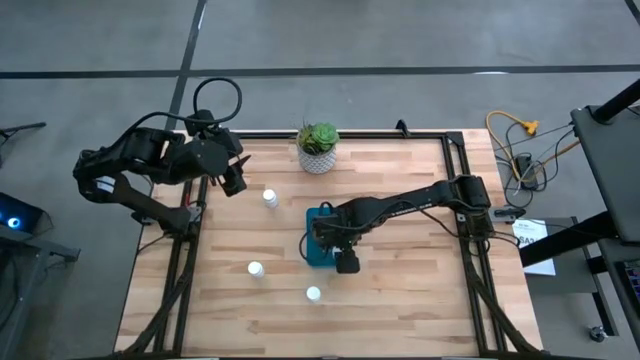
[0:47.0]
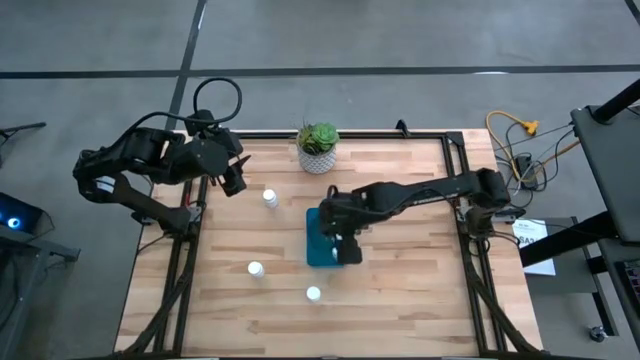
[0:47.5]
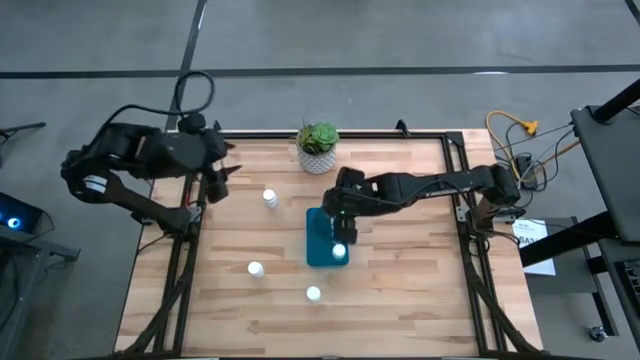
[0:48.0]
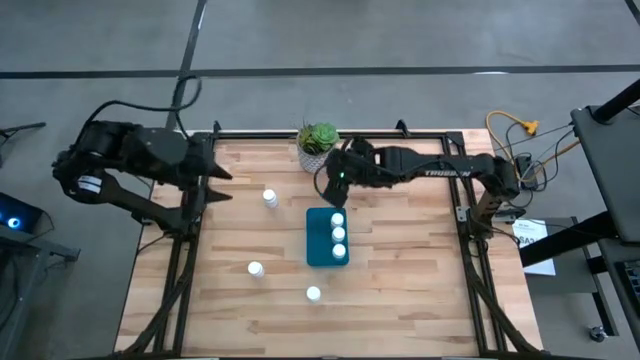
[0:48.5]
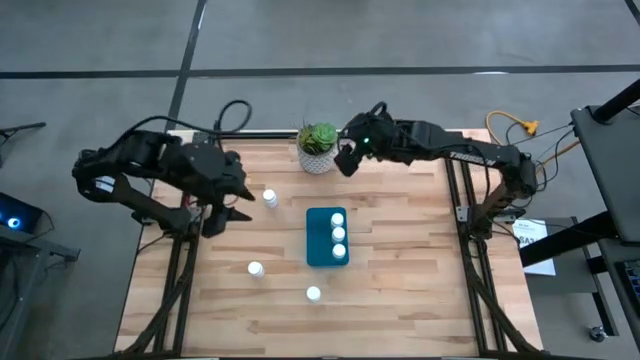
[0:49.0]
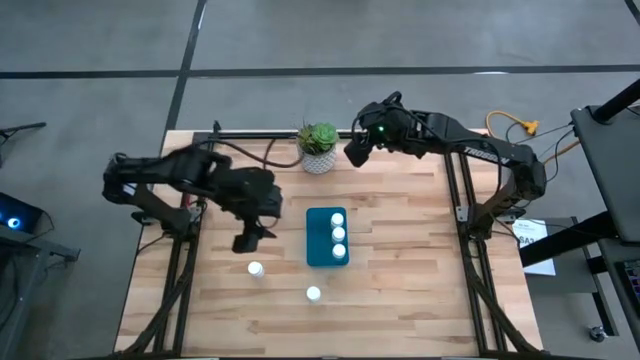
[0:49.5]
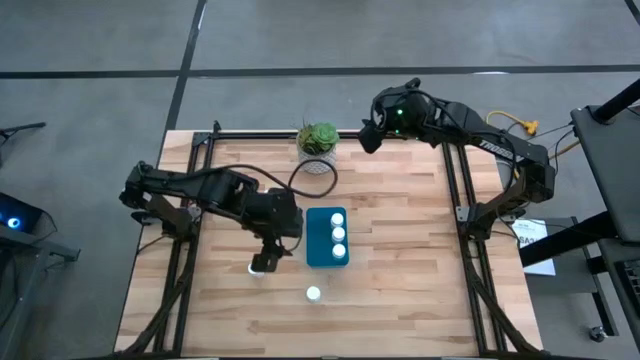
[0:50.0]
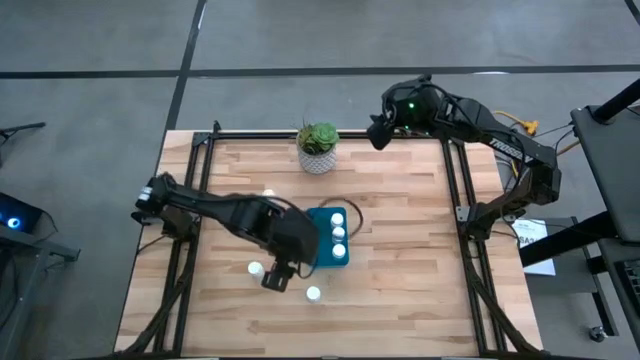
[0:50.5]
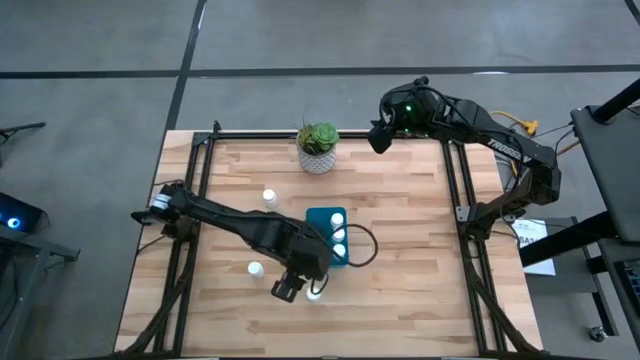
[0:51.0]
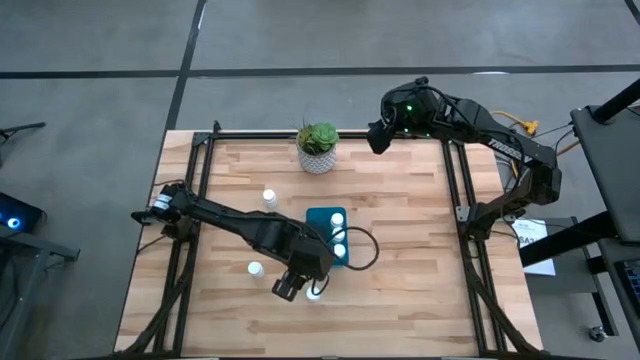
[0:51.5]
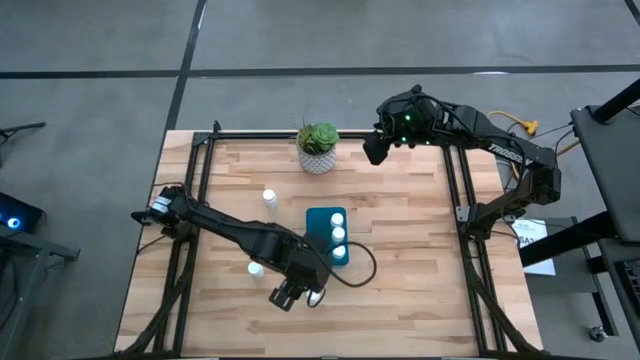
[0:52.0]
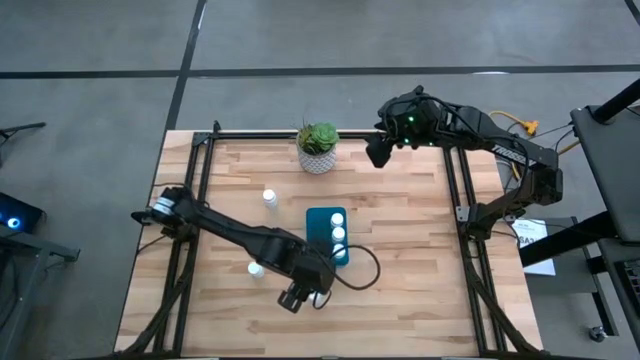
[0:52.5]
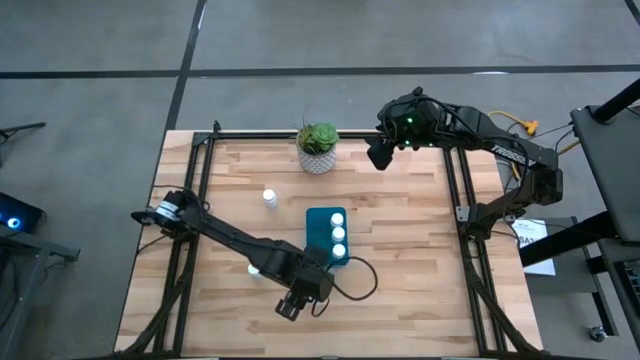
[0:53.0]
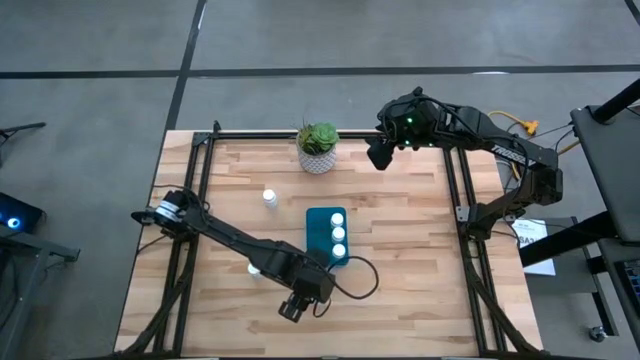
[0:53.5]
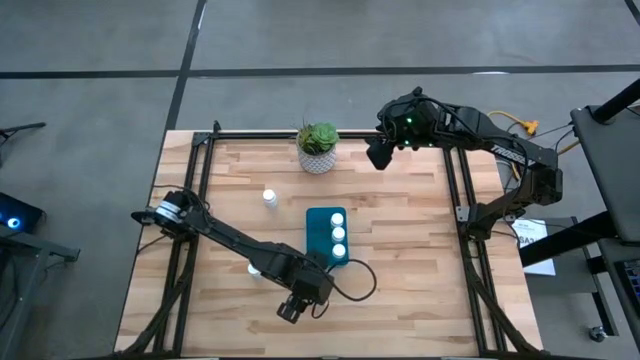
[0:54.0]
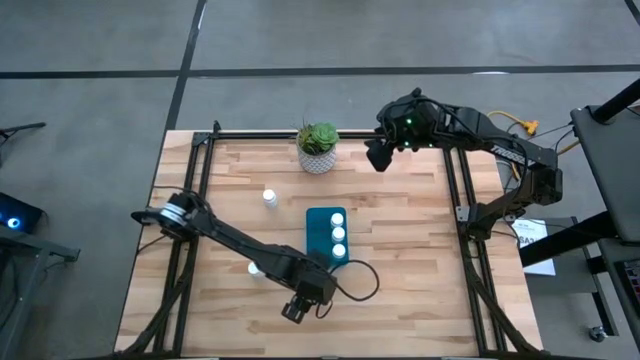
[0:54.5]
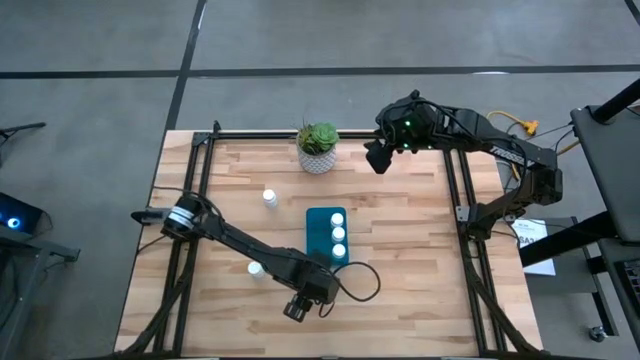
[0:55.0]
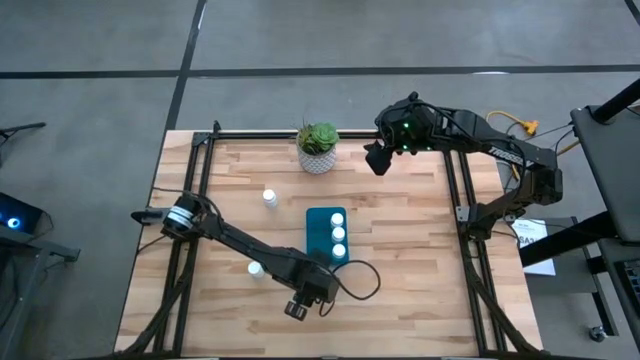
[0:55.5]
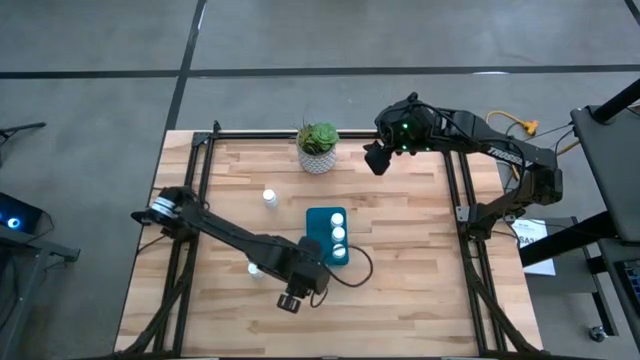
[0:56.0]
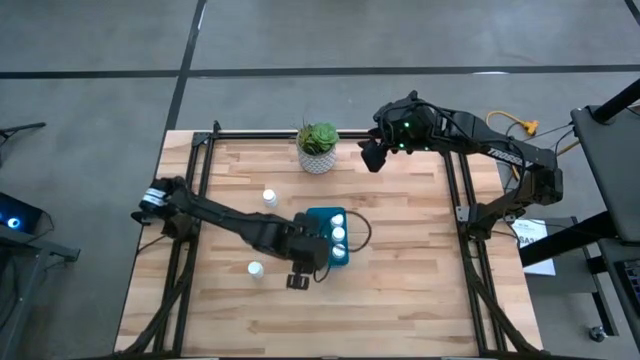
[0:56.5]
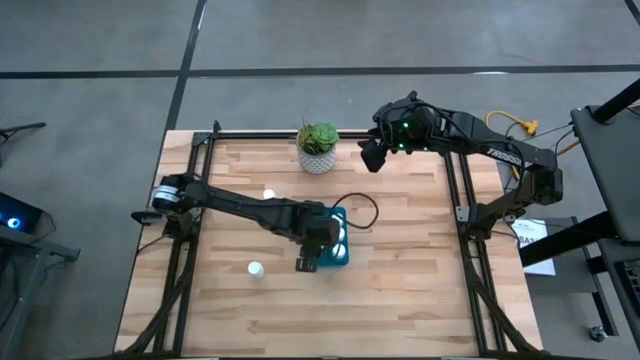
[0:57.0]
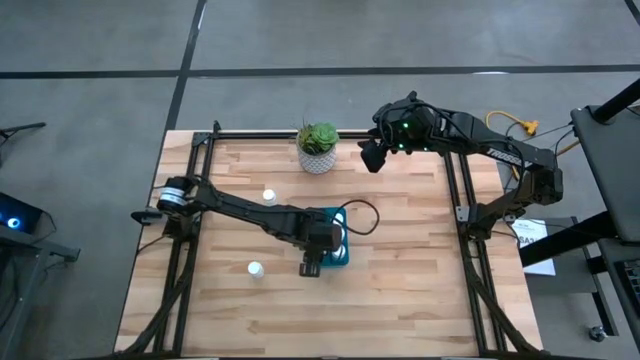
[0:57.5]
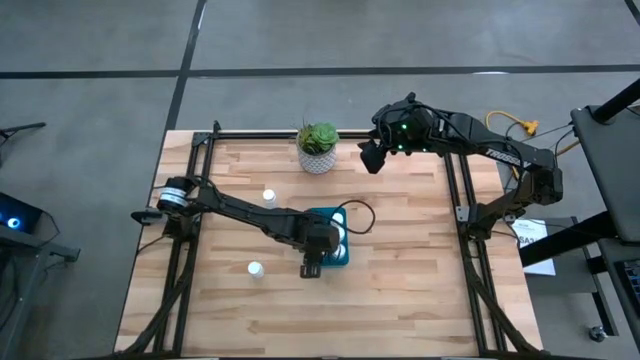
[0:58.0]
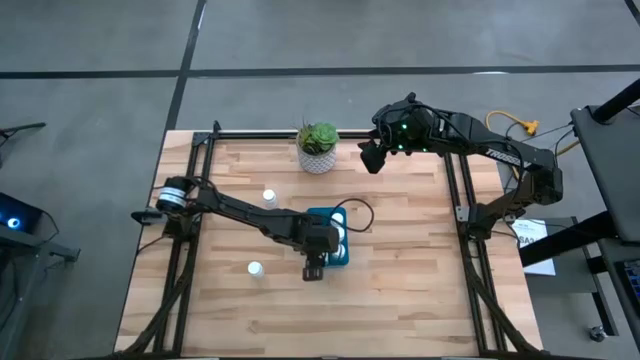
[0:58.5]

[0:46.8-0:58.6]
Task: Pick and place pill bottles into a basket
Put the white medicine bottle into the blue bin

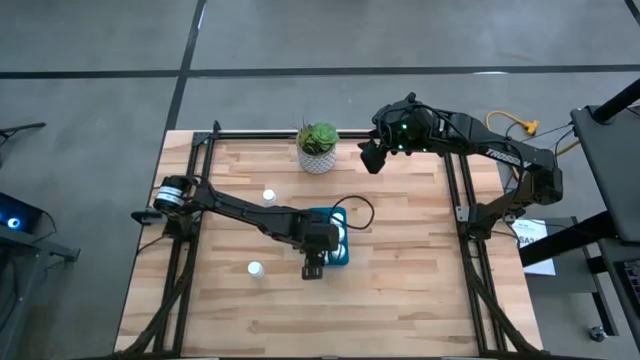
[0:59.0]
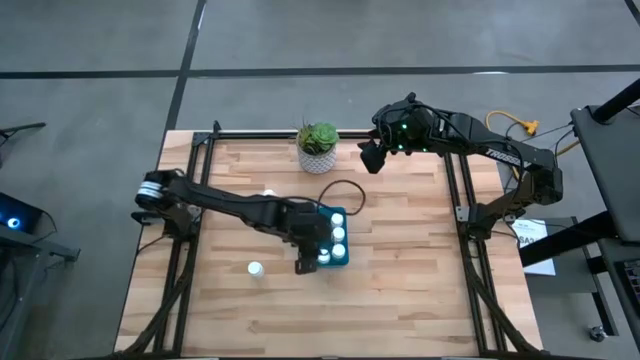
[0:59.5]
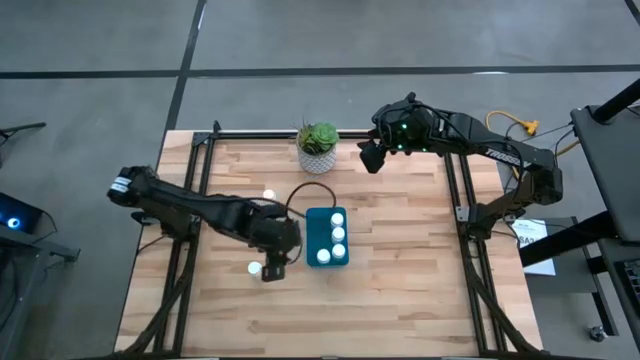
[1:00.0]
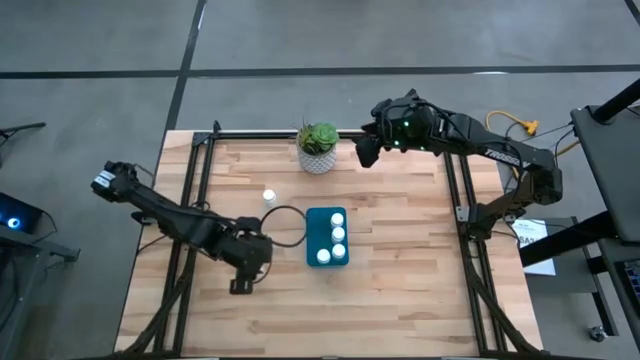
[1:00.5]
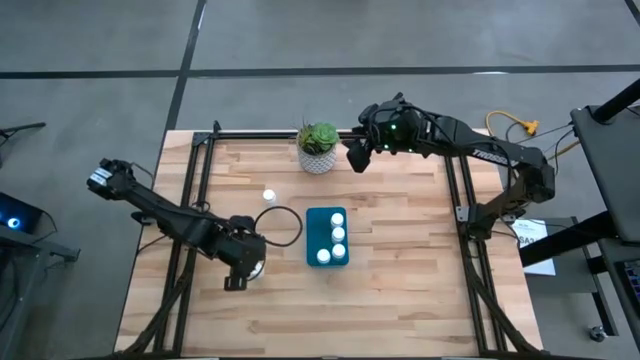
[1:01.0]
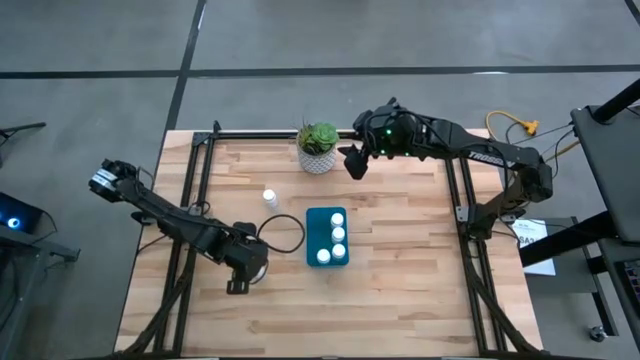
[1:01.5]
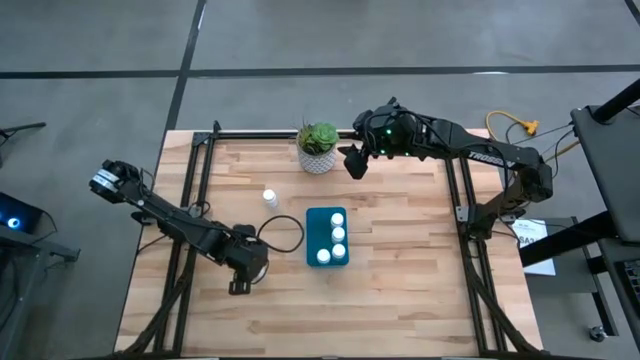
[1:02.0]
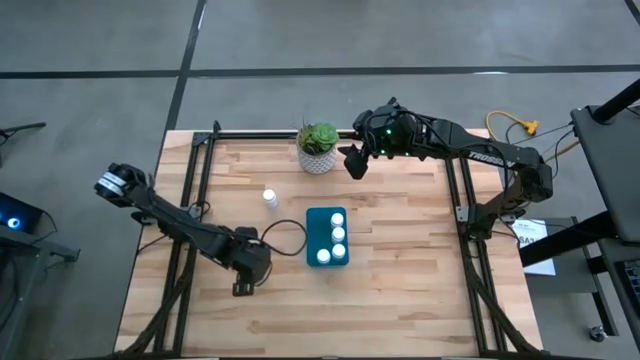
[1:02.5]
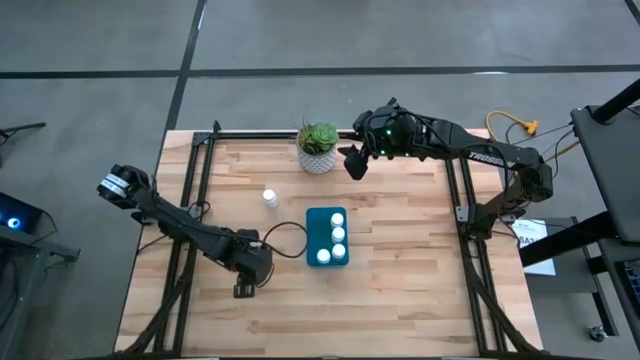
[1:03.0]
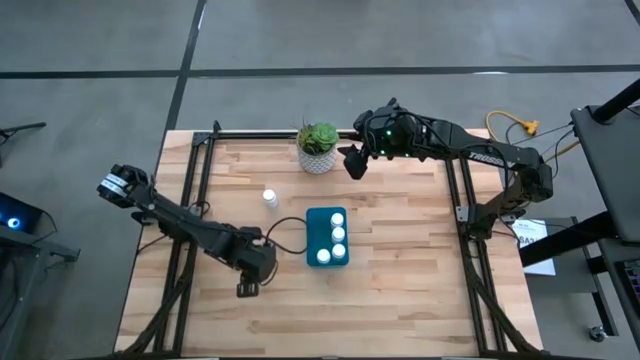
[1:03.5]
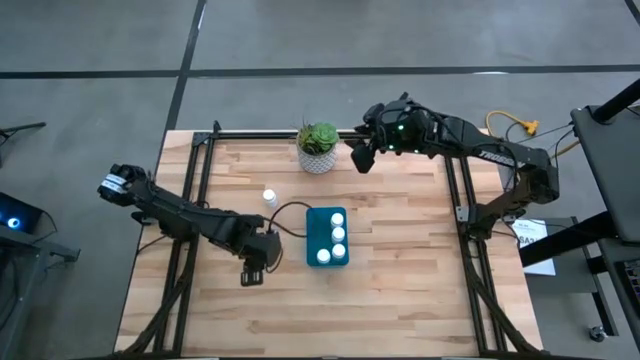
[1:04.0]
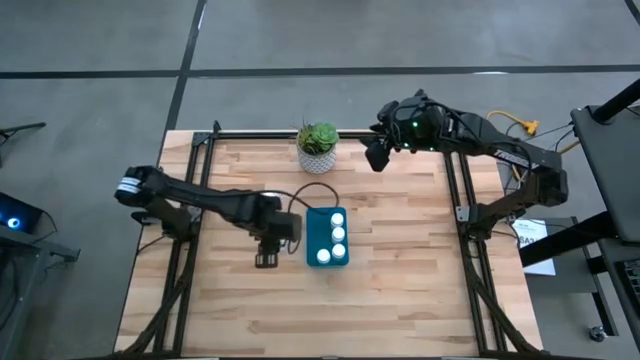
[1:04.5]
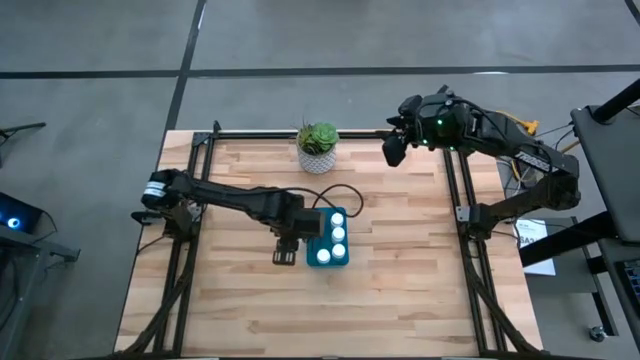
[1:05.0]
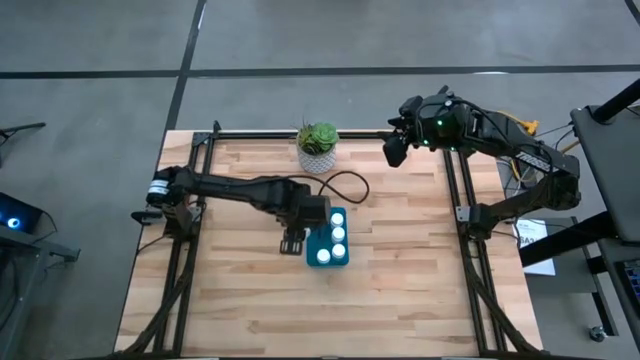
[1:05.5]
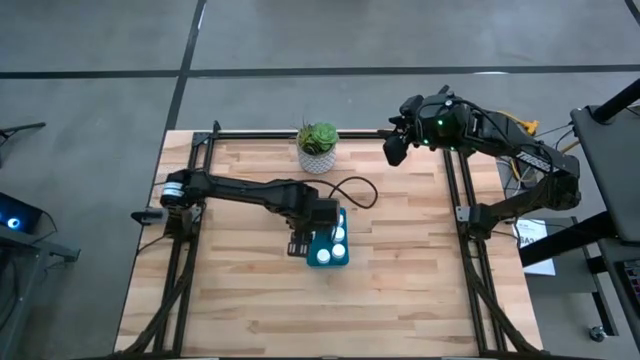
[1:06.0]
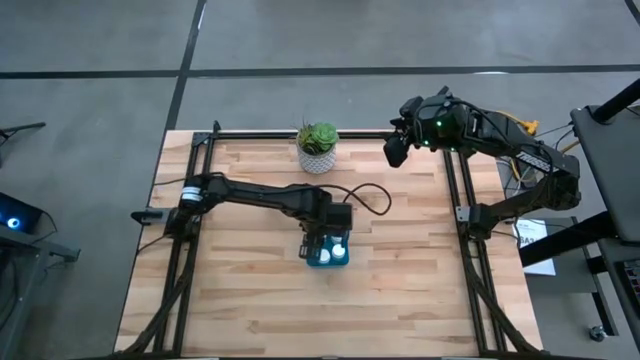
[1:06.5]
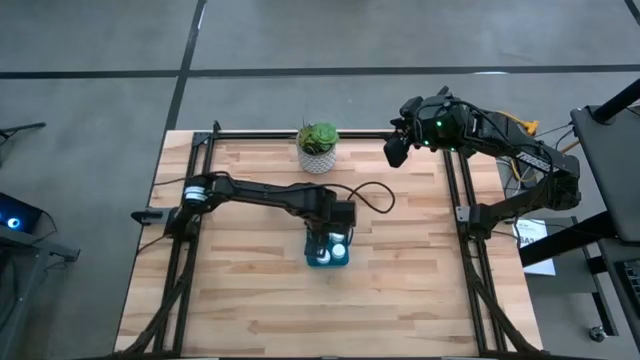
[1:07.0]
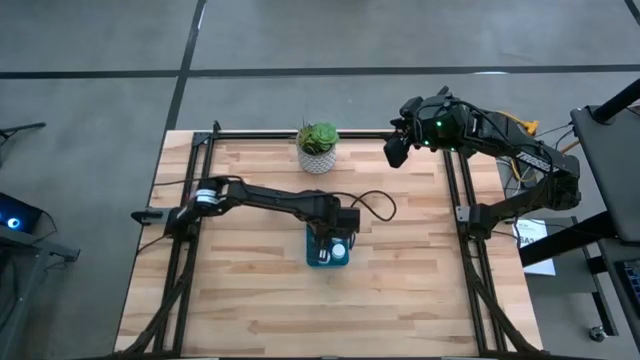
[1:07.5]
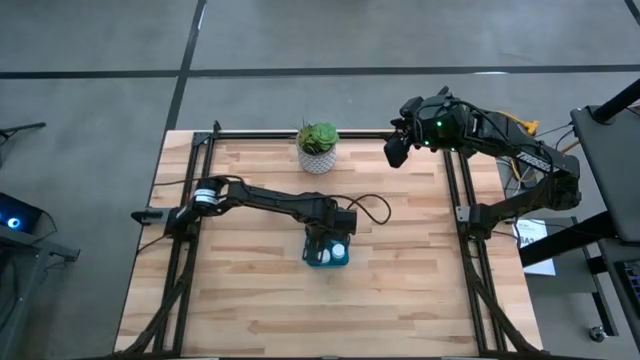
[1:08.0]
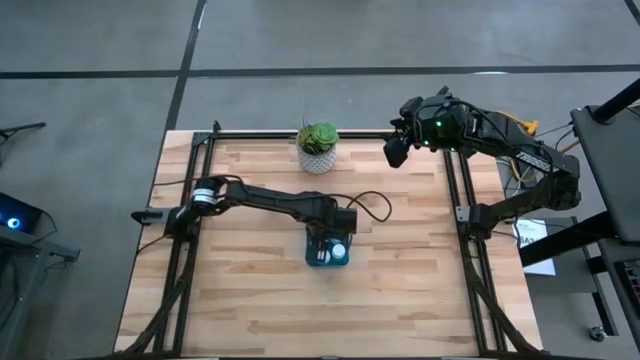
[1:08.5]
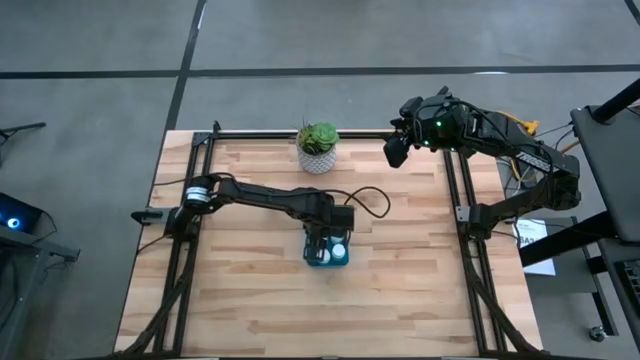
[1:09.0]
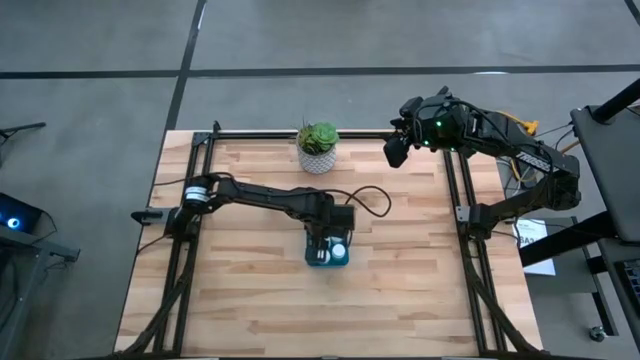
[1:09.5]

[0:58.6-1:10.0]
Put the white medicine bottle into the blue bin
